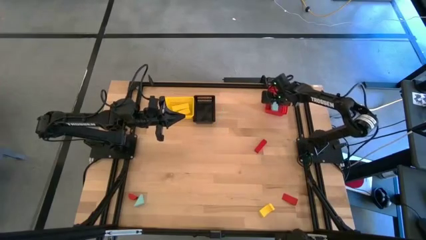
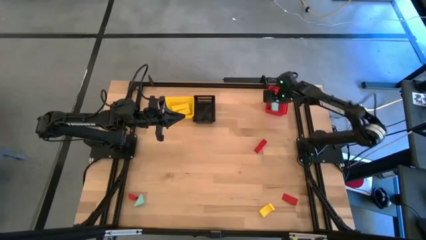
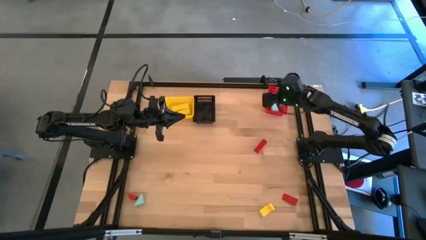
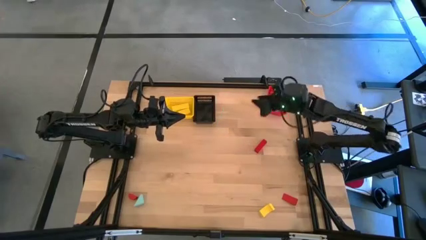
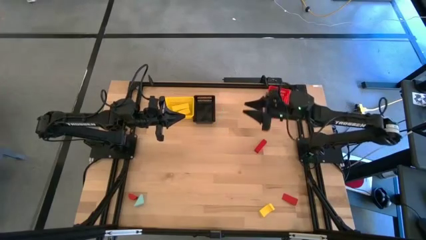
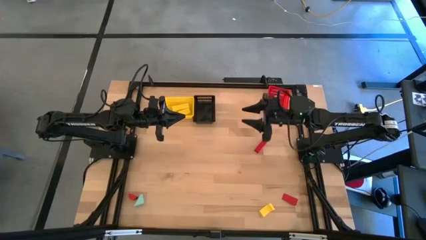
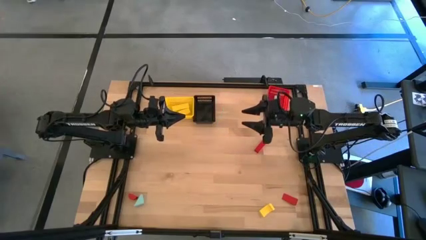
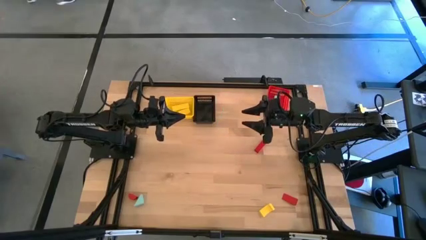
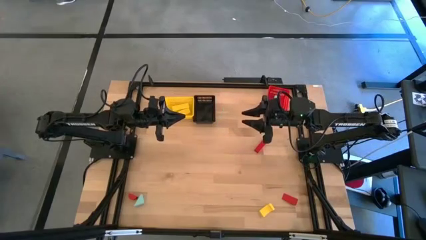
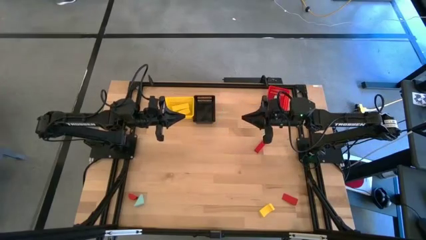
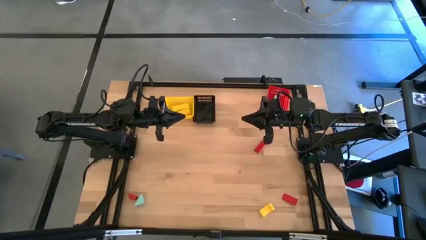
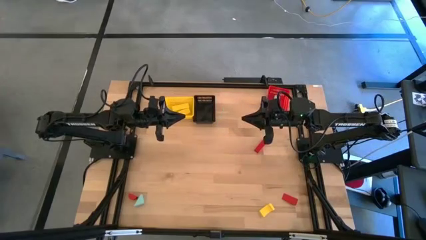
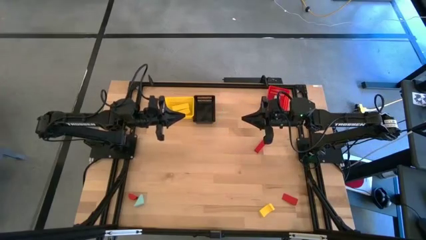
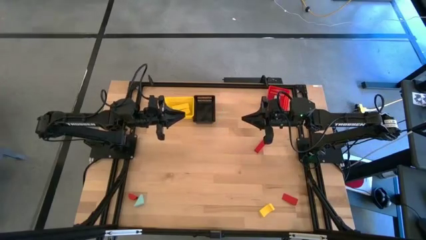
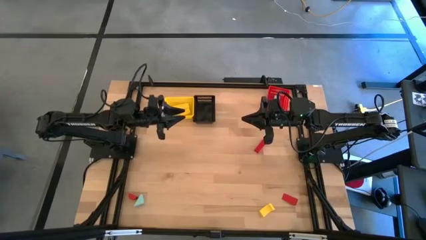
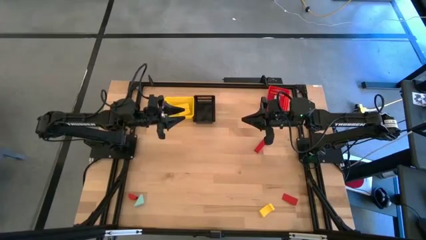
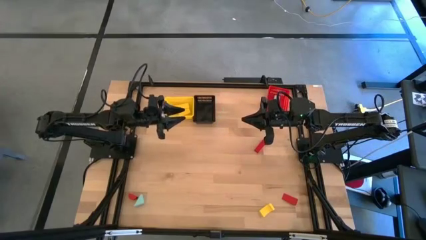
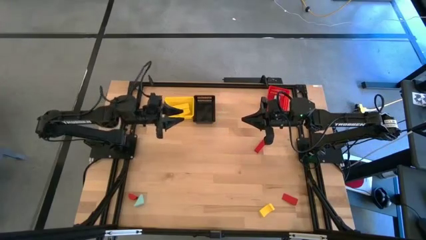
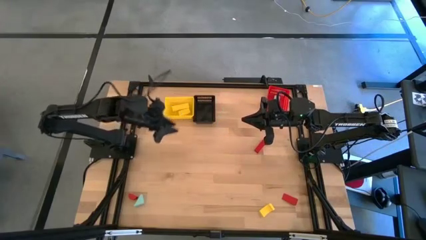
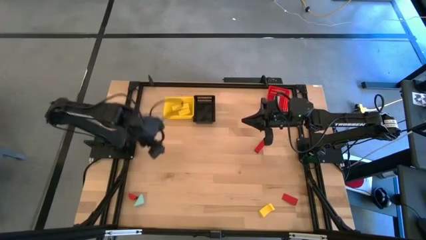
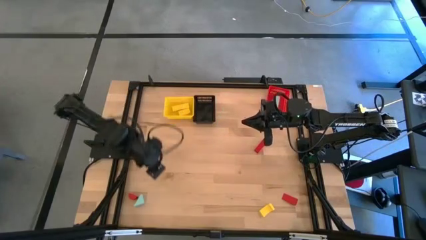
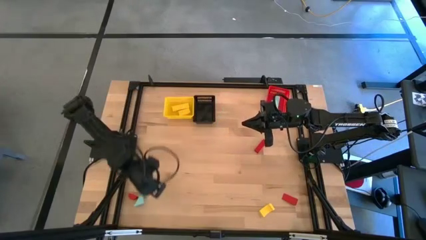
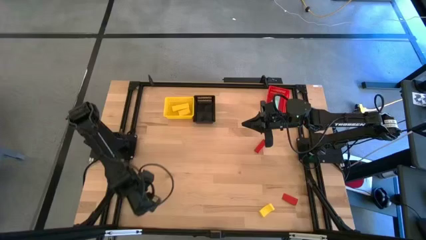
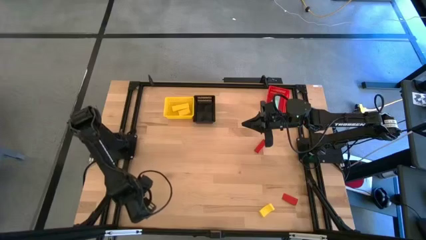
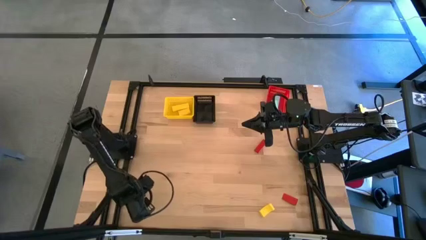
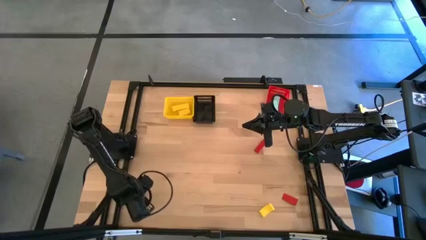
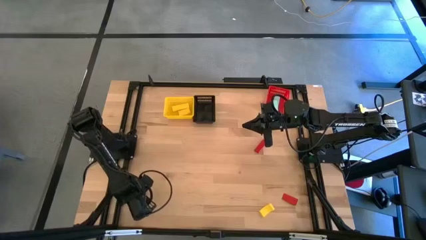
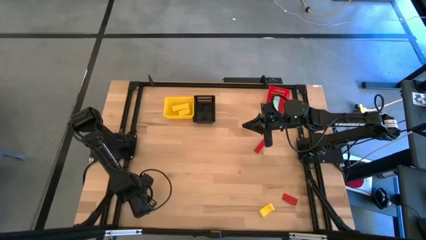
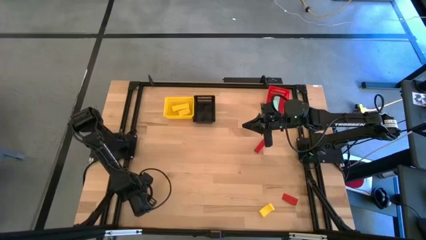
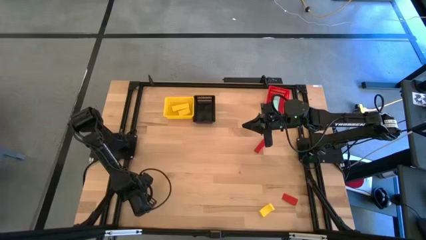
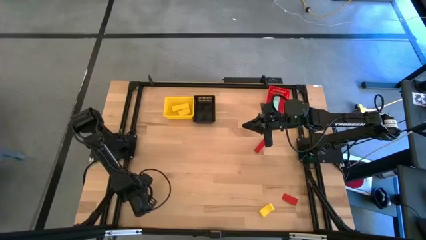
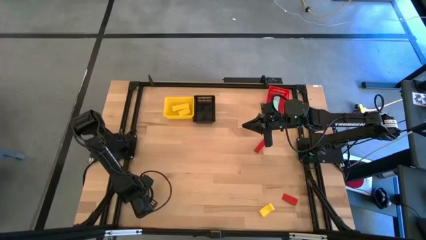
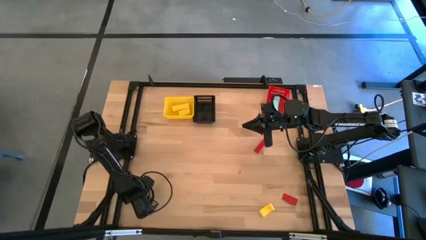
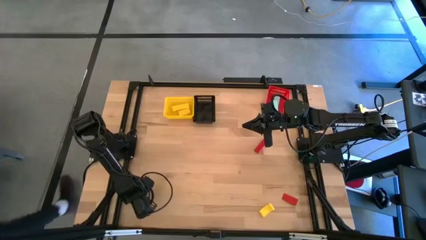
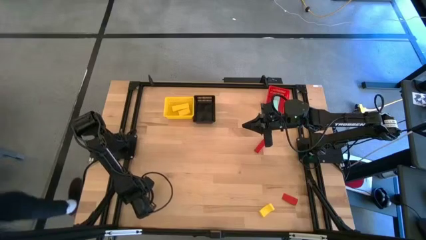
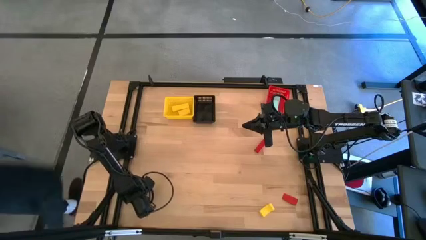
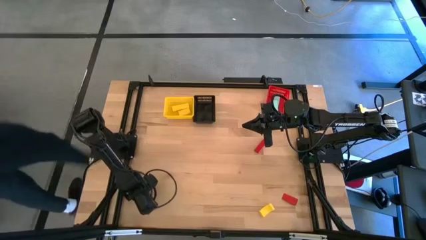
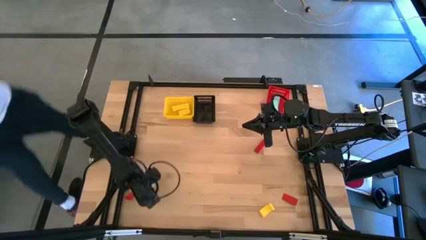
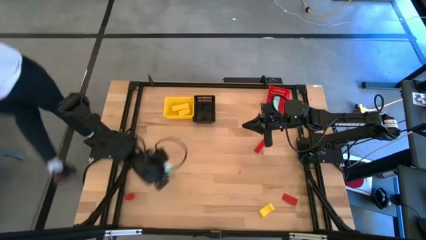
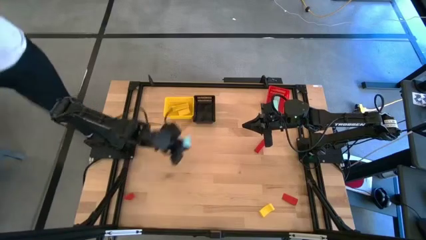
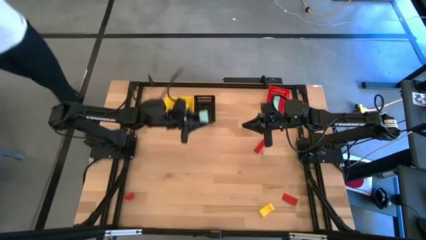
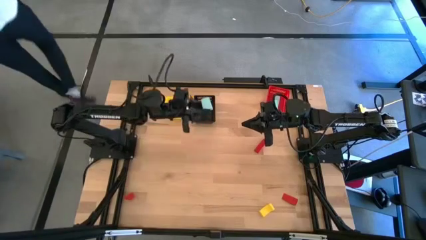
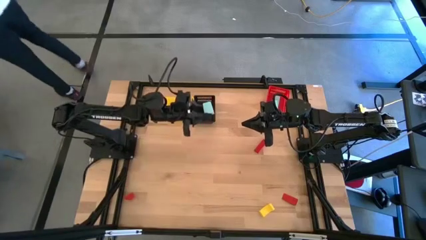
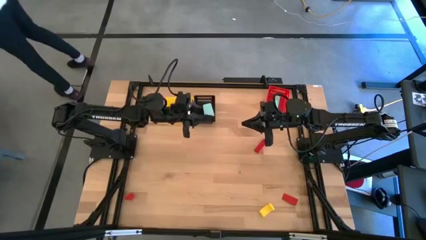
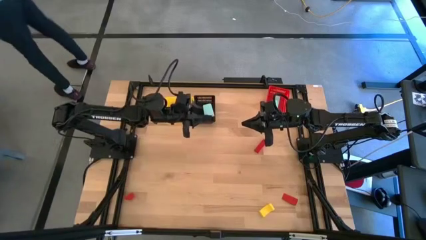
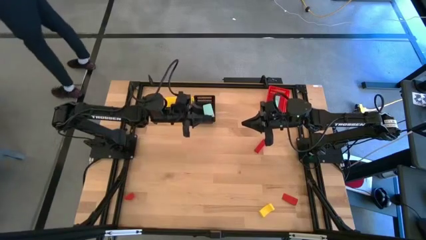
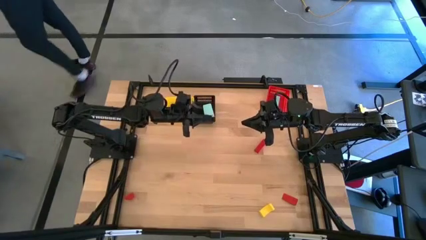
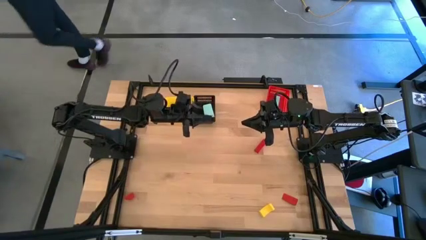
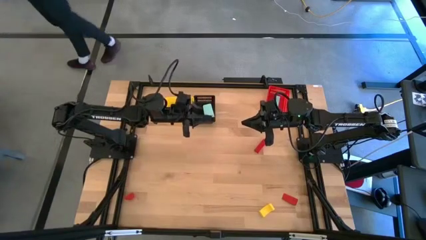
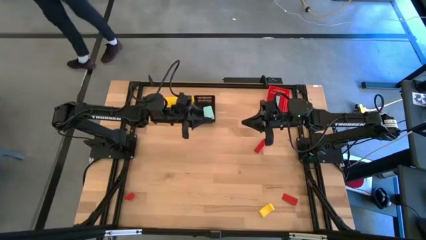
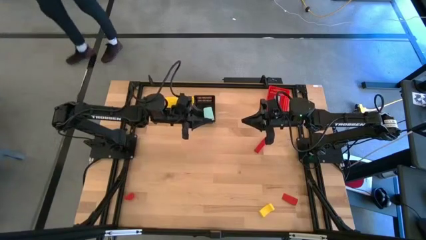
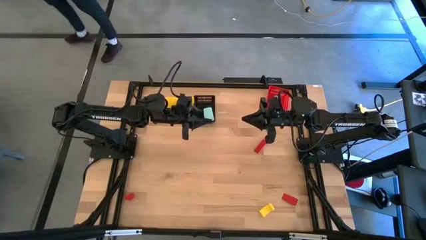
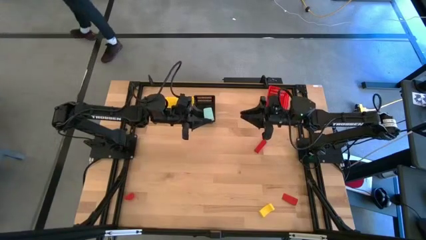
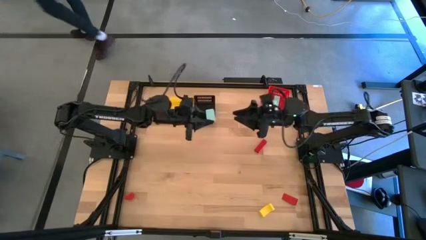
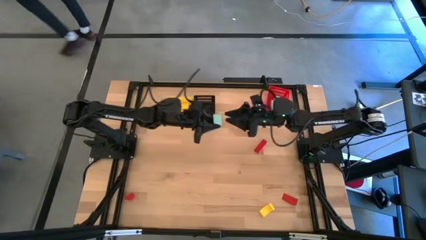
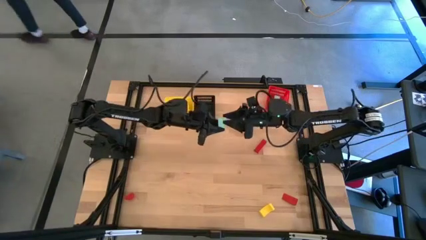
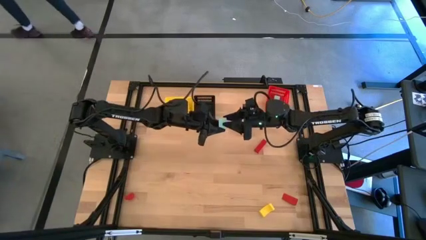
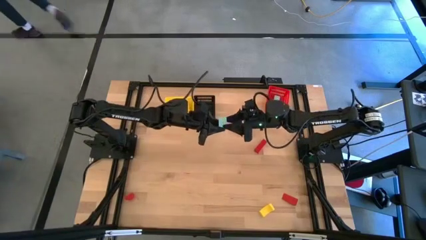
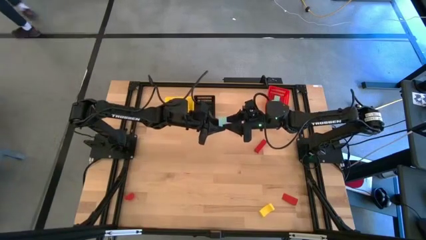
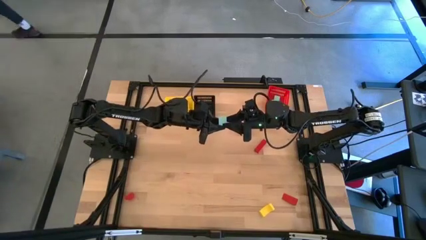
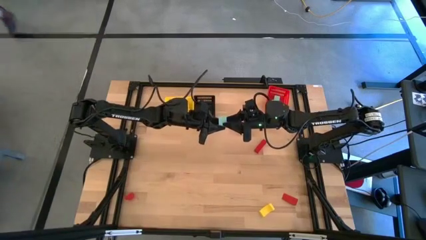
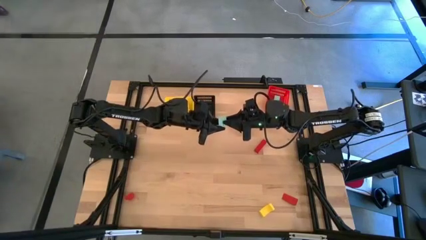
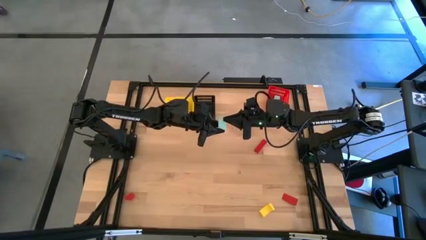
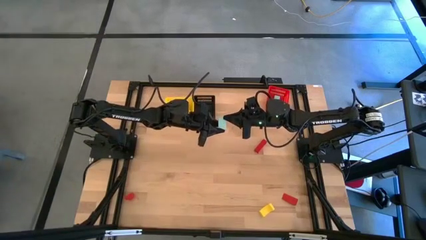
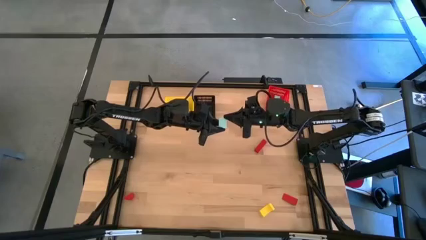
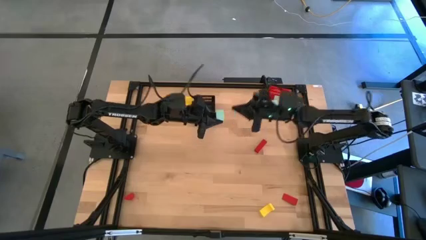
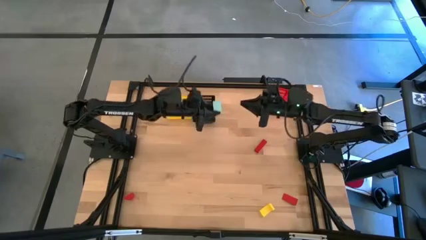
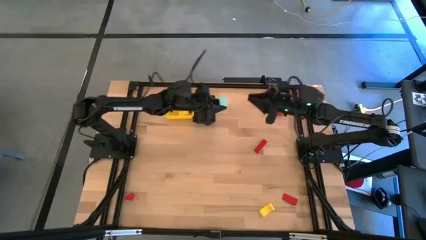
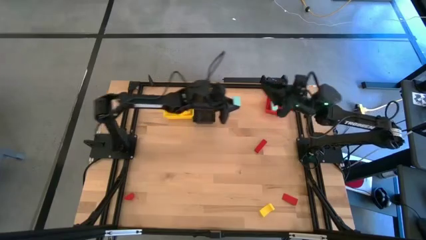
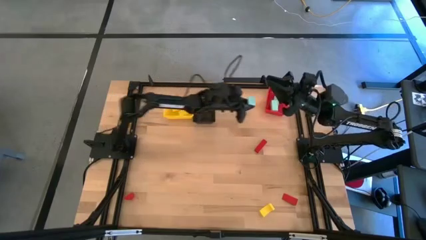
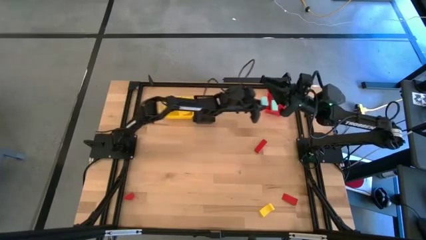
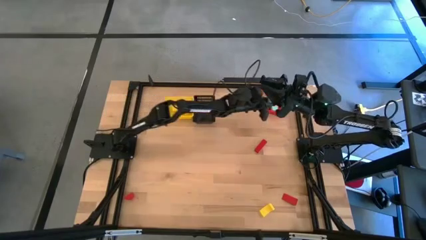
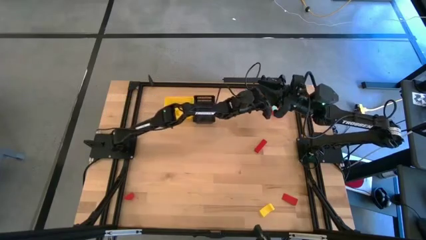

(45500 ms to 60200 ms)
Task: Sort & place blocks by color
Put the blue block into the red bin
